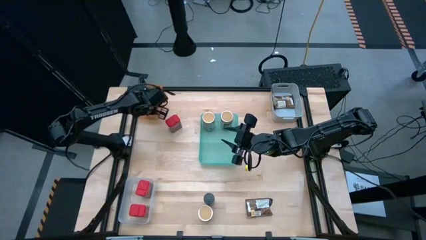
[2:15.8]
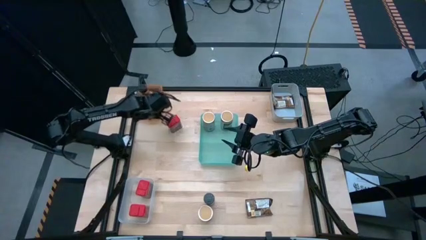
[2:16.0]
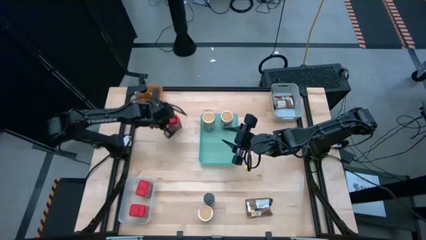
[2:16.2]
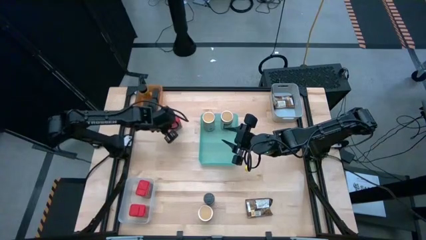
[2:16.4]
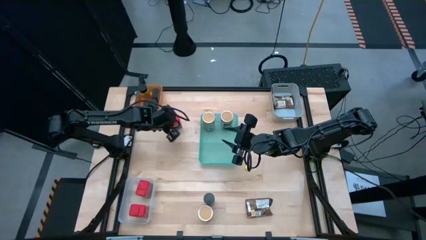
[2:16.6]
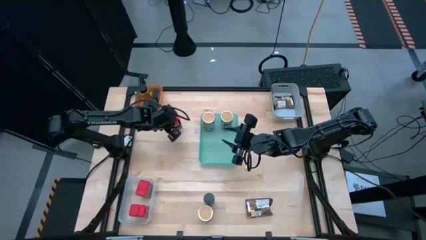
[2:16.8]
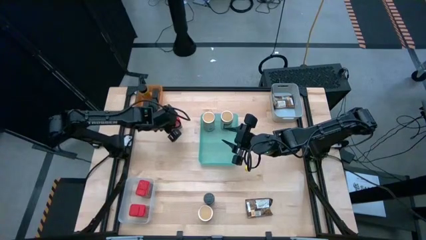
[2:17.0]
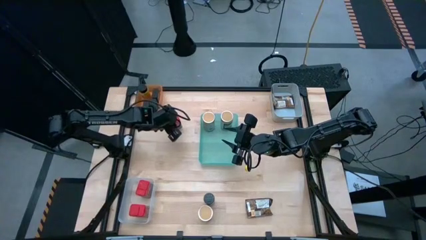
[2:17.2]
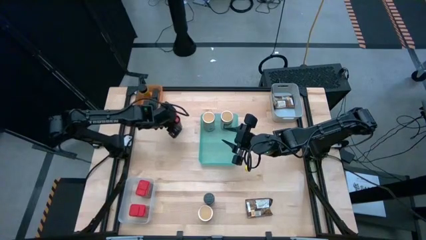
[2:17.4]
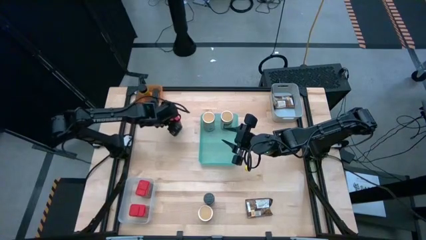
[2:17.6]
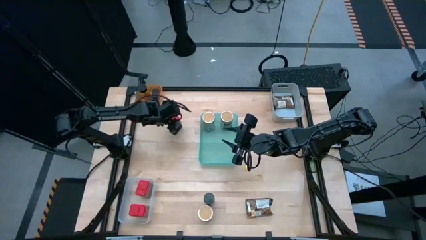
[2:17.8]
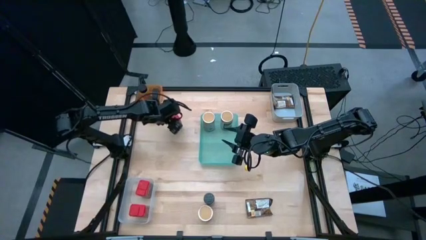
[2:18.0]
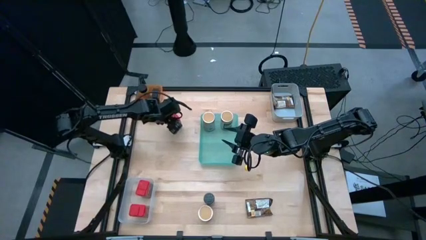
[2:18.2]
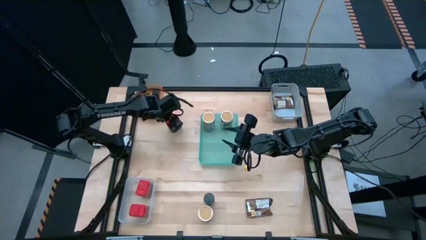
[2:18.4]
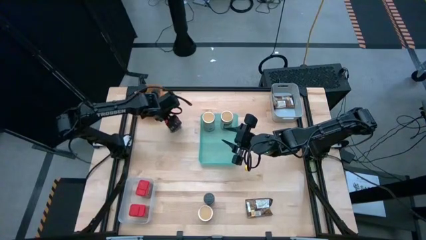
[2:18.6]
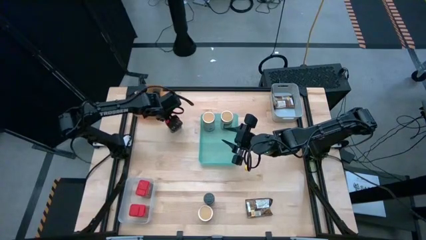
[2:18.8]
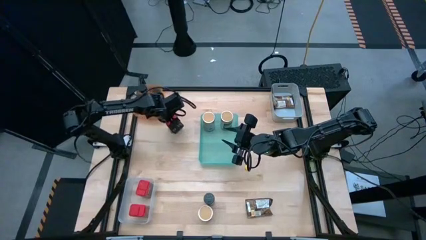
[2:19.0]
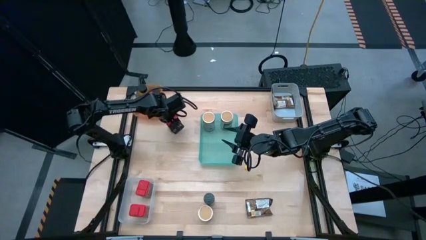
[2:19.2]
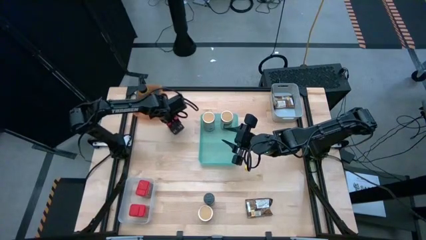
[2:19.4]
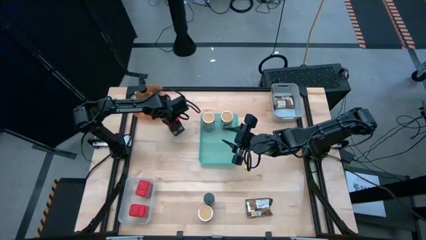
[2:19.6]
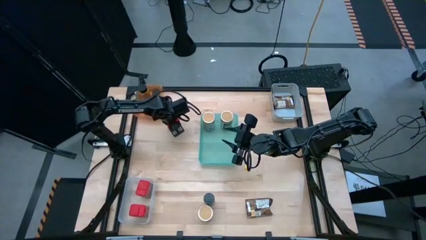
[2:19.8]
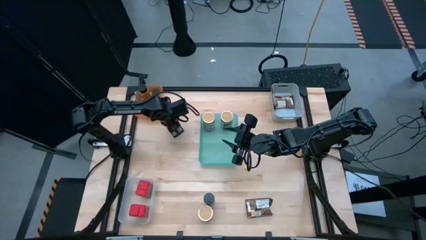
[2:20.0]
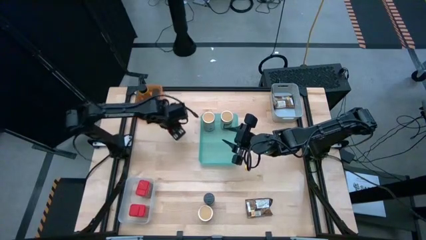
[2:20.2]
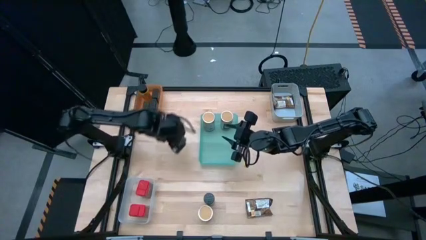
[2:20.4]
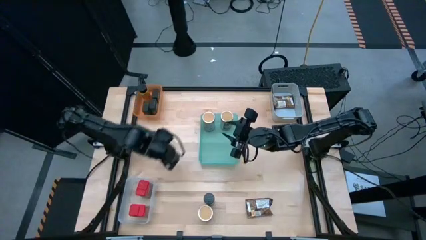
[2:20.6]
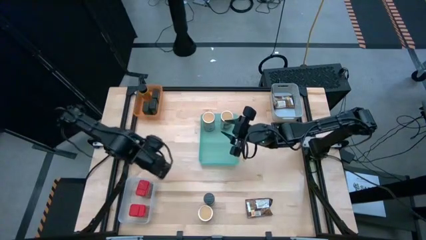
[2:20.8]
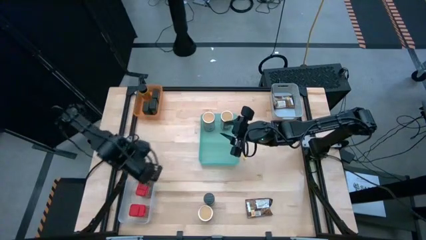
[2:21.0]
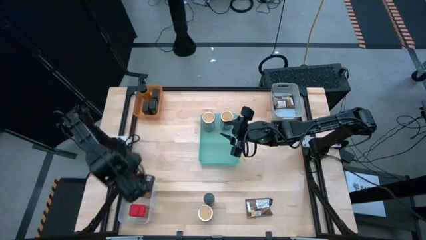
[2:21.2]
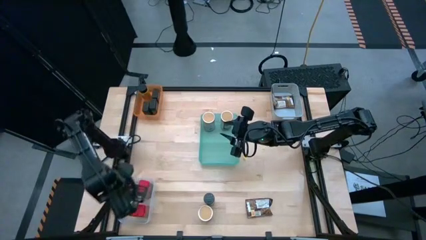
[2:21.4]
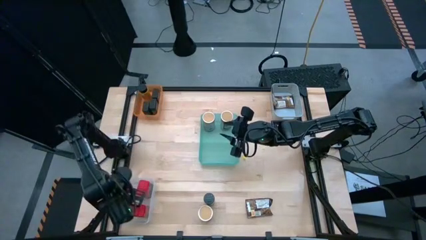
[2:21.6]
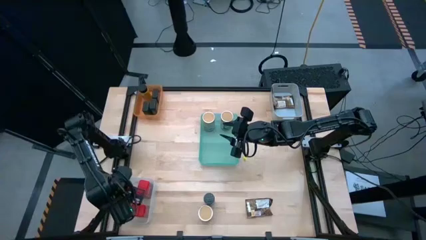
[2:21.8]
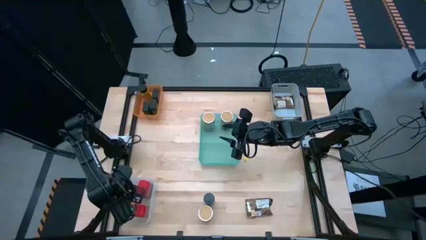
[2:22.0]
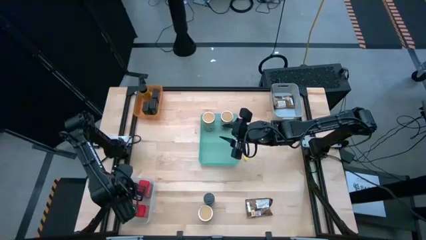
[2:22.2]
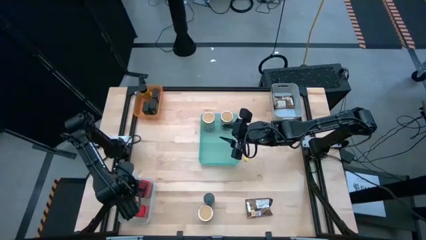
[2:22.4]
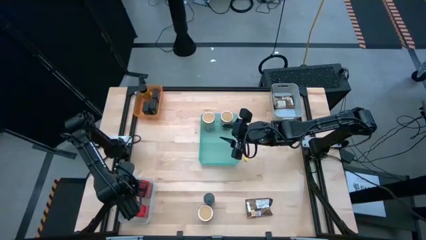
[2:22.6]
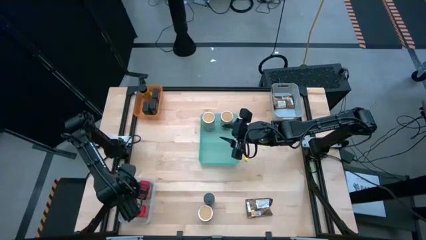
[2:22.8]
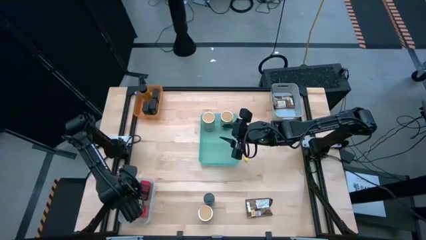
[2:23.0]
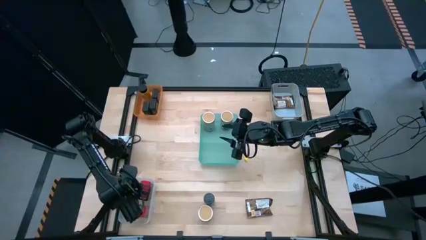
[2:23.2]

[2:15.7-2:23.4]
Task: Sort spices by type
Put the red seasoning can into the transparent bin

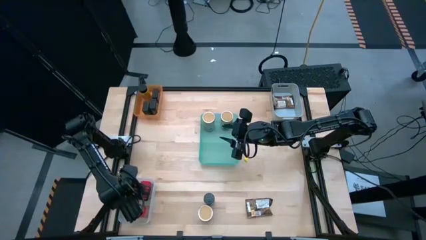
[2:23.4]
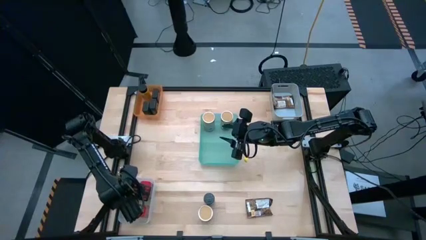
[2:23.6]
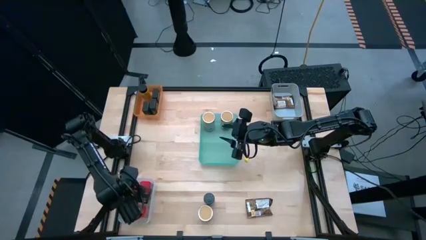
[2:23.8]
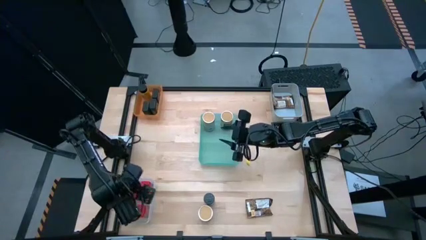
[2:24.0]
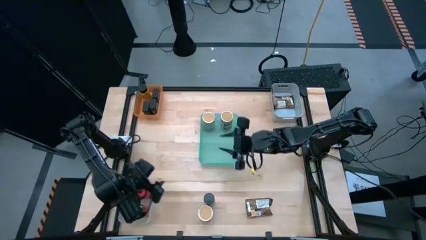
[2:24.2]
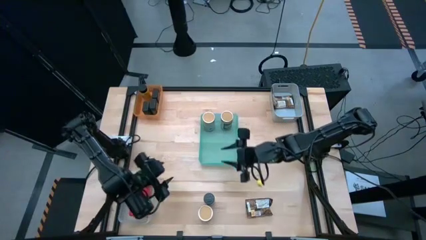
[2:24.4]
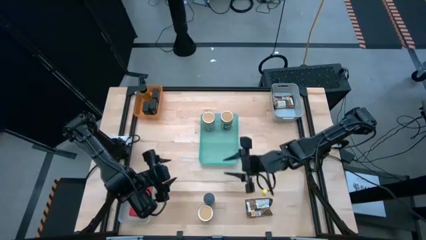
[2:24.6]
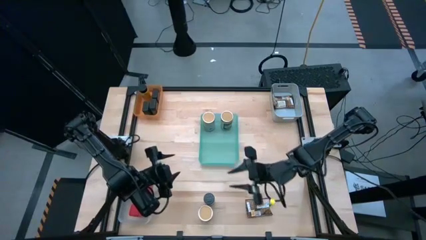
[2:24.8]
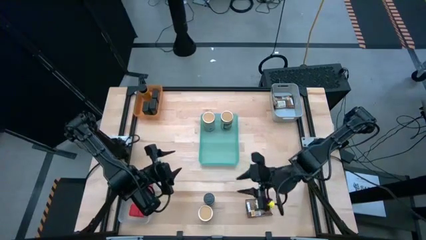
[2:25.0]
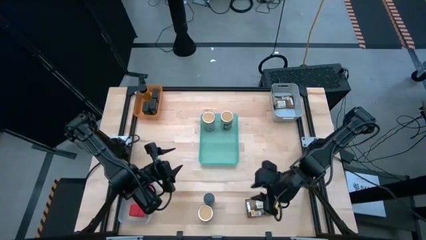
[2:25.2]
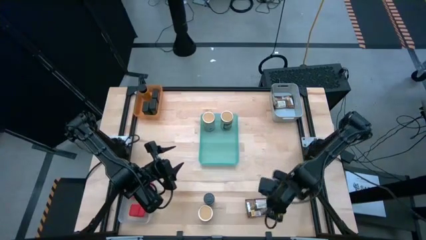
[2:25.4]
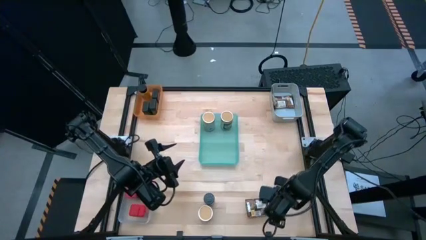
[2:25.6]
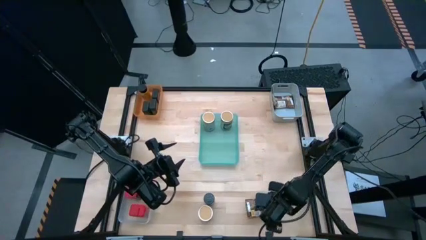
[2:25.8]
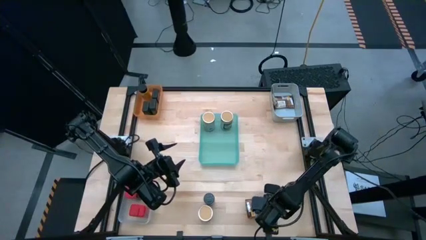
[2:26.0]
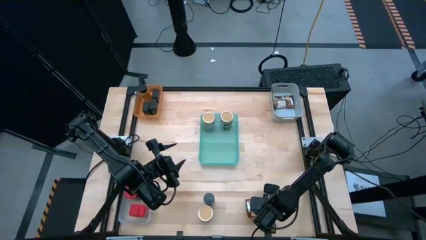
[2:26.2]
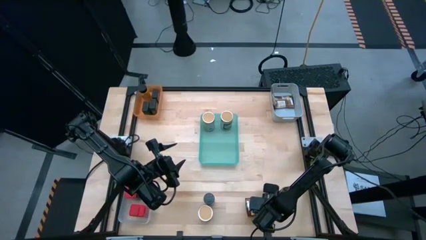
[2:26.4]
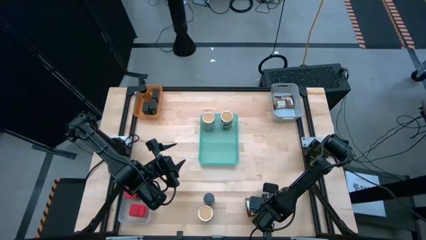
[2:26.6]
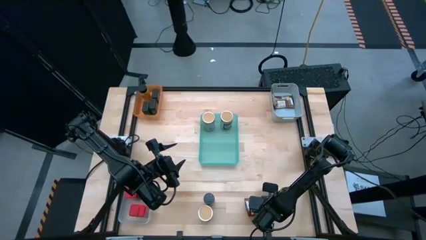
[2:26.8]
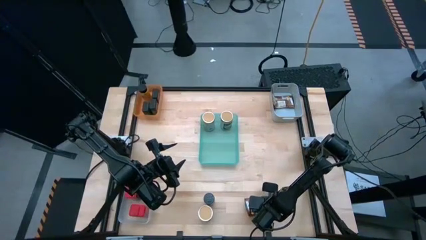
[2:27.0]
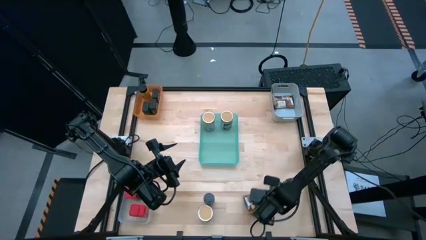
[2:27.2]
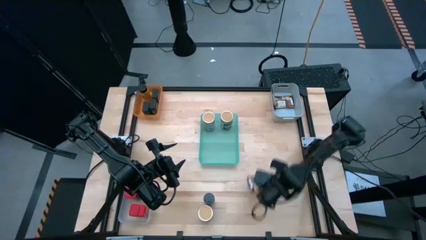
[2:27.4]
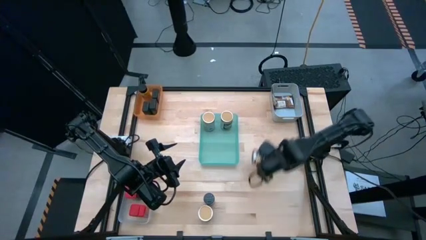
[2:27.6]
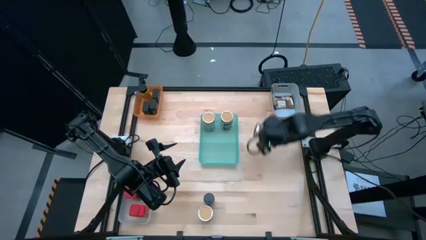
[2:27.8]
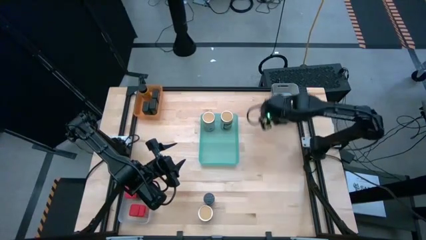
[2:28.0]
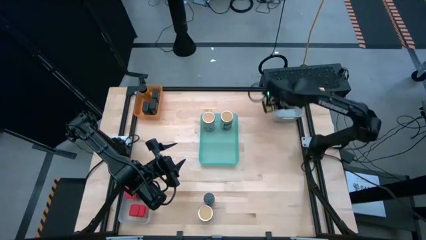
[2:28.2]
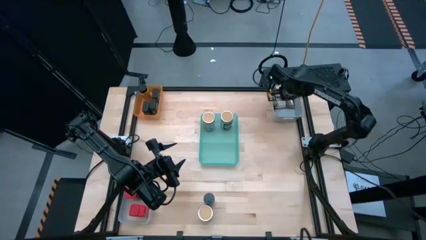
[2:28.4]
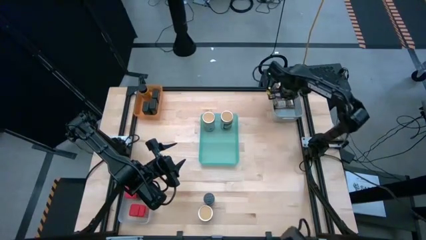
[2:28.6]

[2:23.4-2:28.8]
Put the orange seasoning pack into the gray bin
